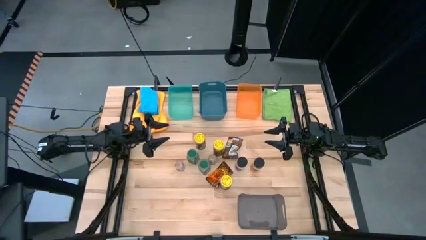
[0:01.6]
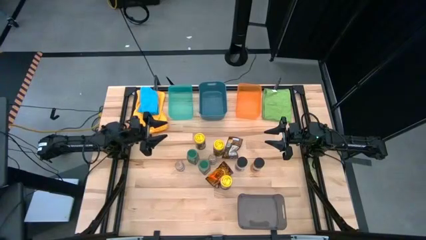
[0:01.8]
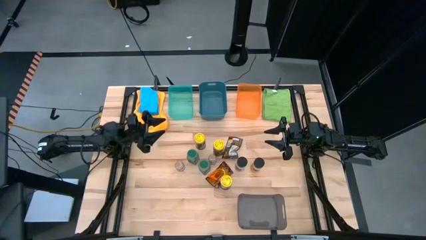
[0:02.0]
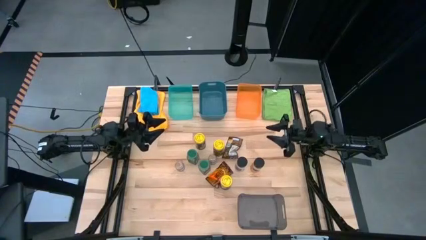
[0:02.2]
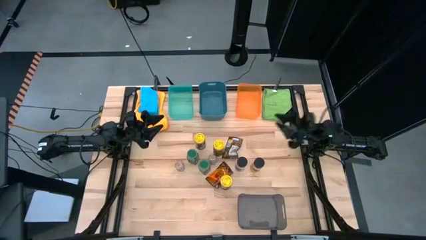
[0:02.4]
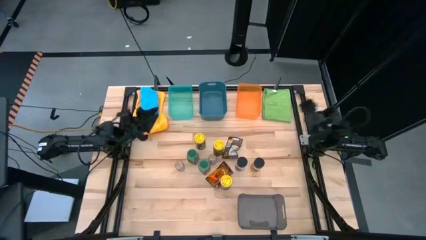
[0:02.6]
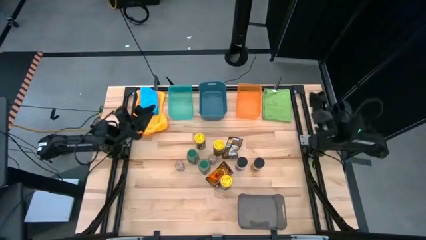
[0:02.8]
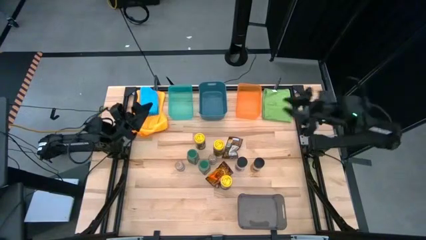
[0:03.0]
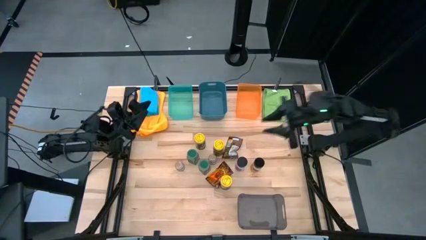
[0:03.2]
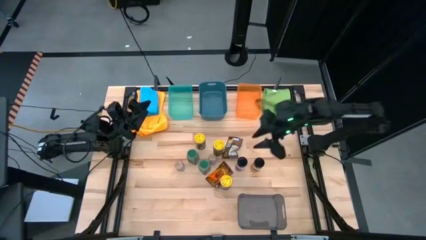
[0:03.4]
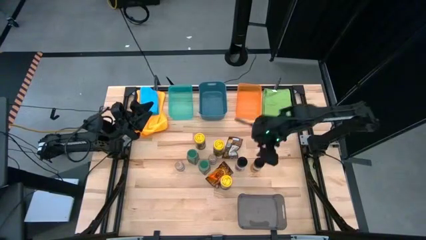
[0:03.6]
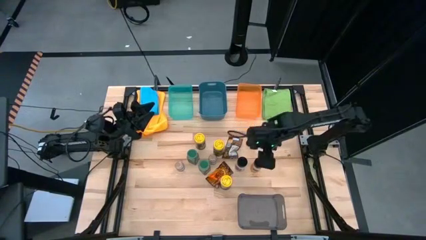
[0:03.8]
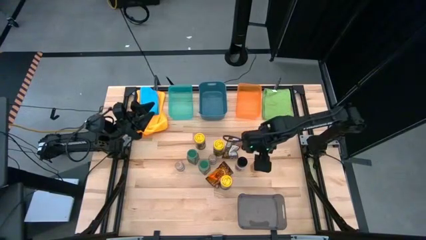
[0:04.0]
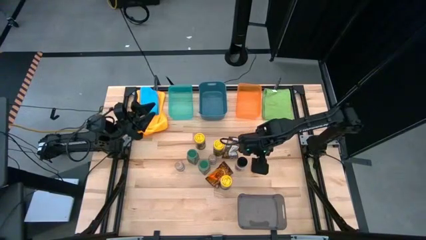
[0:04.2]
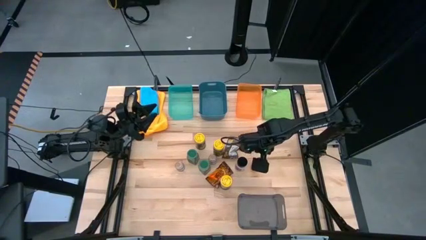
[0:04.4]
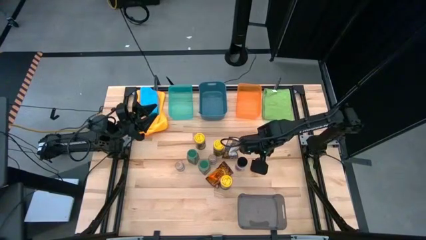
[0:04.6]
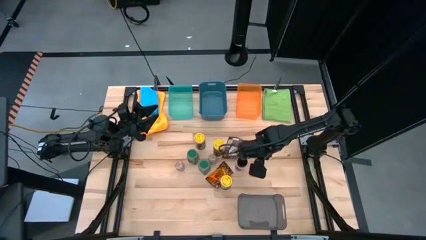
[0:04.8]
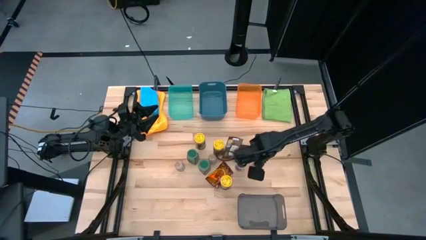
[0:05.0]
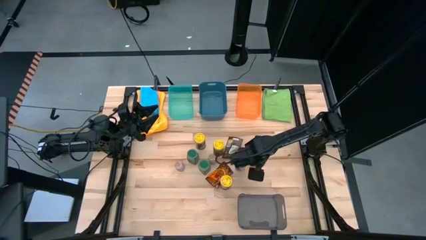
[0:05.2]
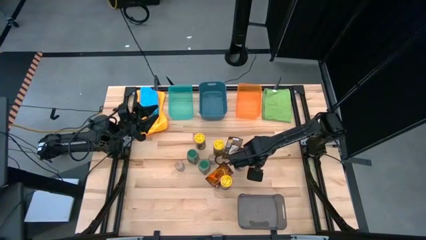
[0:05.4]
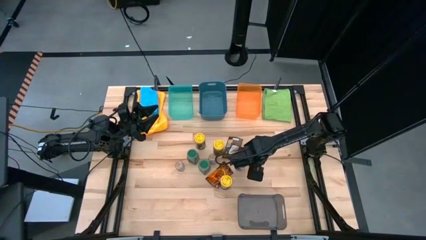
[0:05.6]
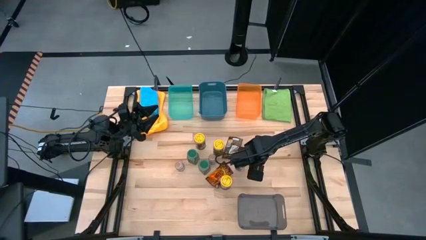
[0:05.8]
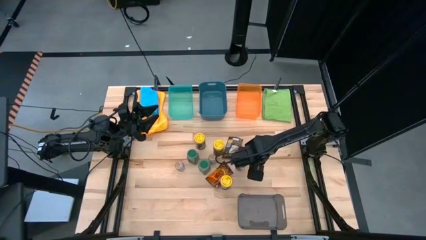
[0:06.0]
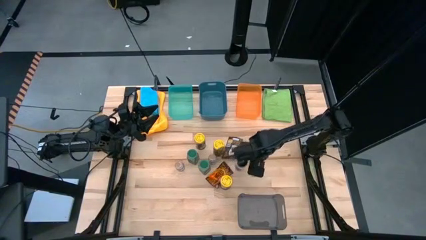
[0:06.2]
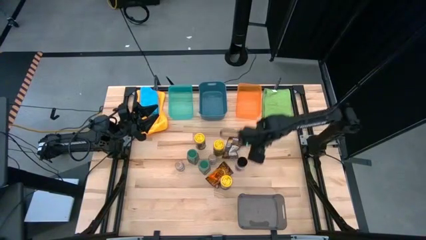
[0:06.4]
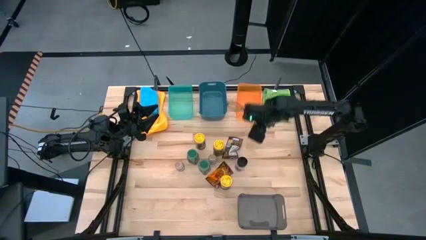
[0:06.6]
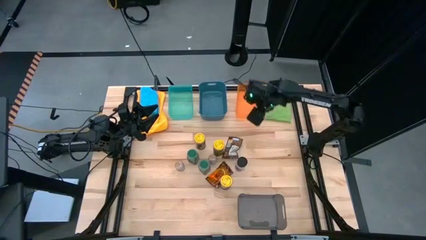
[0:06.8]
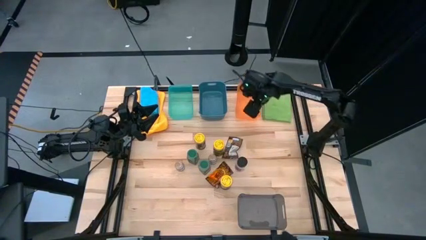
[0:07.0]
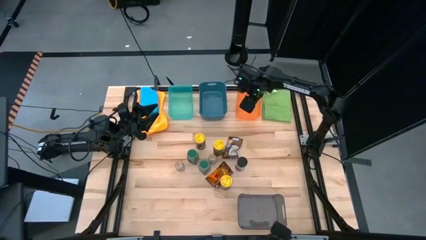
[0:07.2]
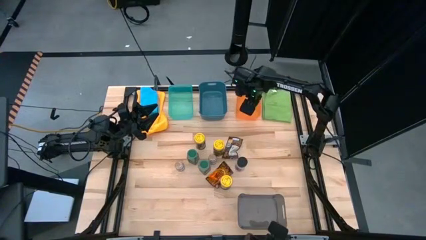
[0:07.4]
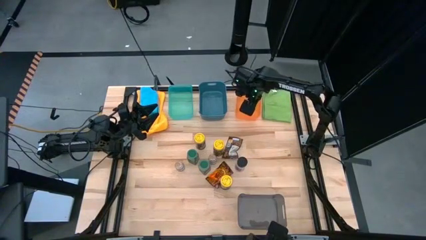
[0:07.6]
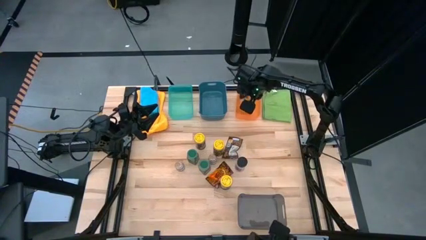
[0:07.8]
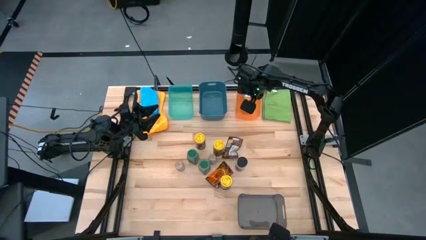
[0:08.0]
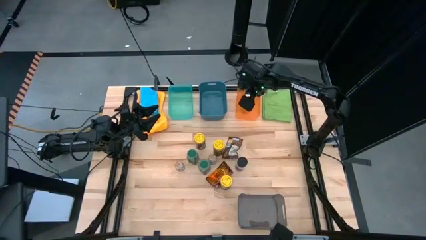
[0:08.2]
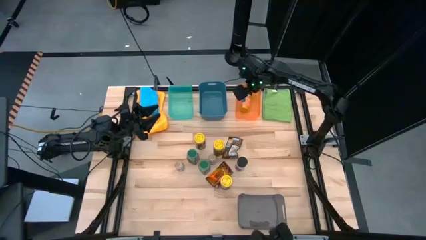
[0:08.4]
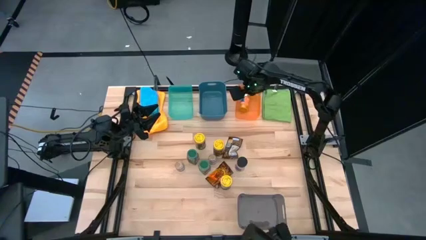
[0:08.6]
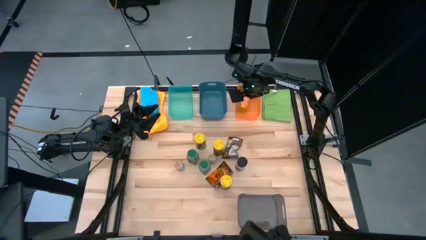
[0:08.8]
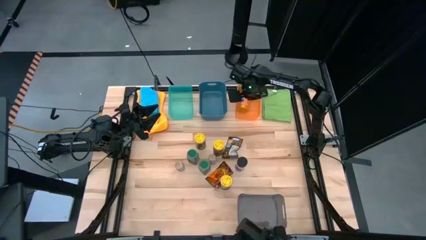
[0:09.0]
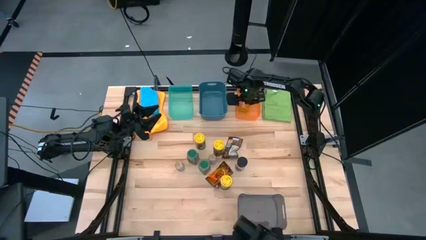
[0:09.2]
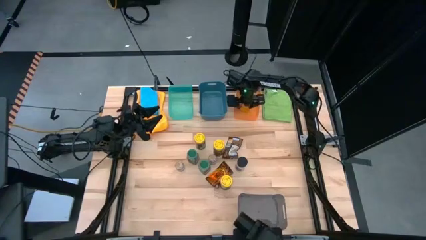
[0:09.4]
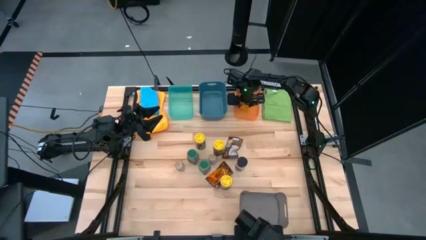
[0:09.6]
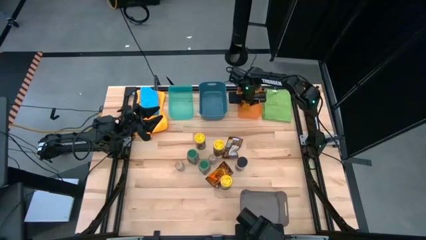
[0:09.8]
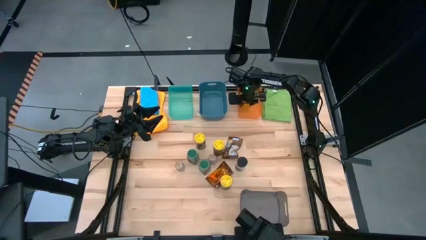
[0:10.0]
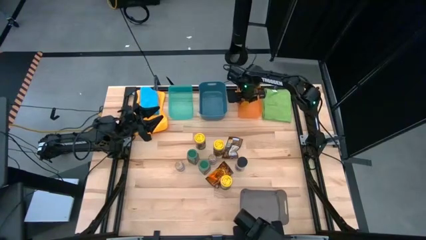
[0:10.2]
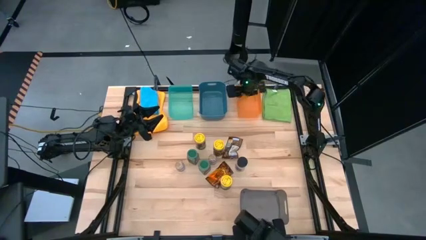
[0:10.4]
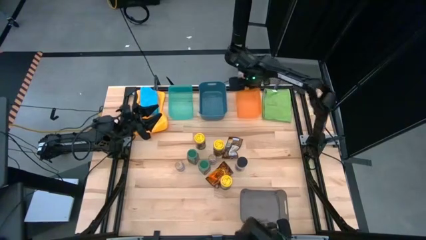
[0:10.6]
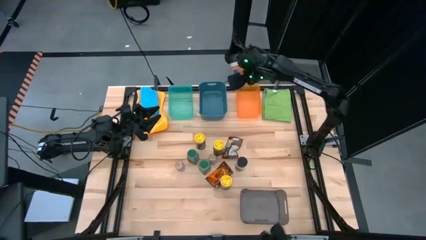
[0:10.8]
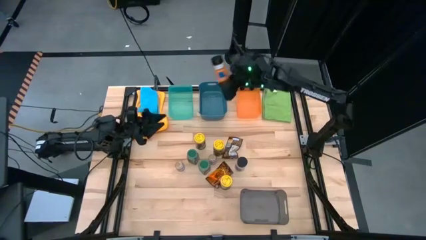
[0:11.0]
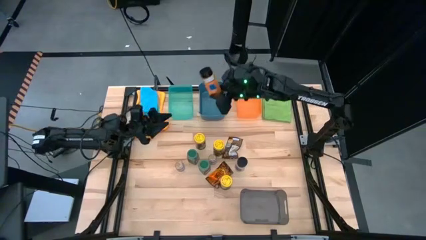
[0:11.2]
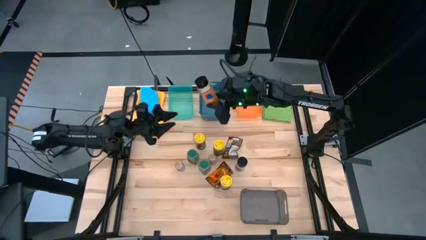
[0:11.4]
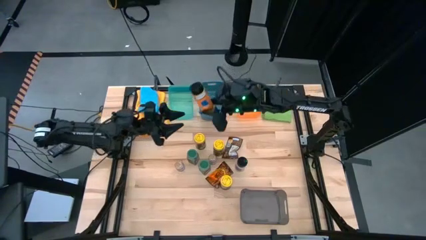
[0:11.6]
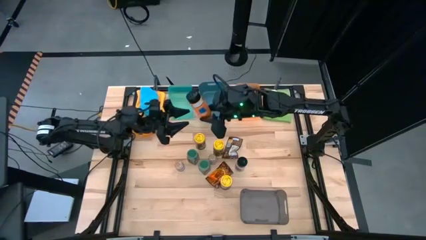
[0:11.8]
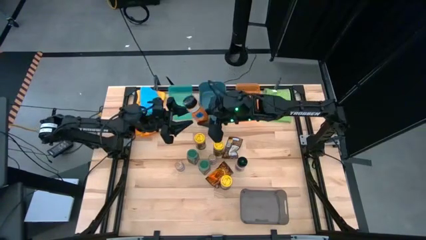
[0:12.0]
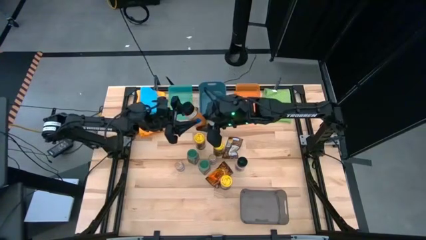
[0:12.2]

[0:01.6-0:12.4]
Task: Sort spices by type
Put the right black seasoning bottle into the orange transparent bin
